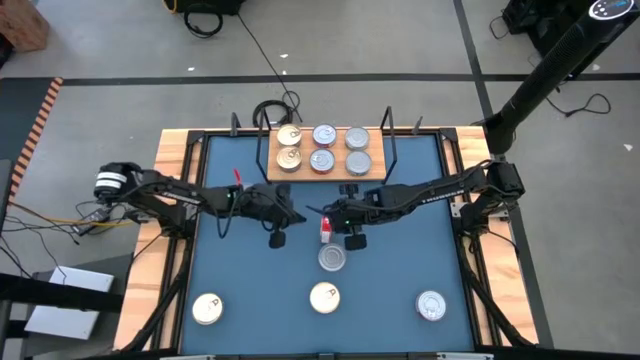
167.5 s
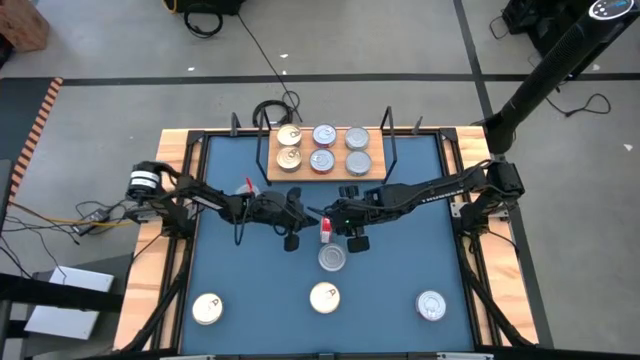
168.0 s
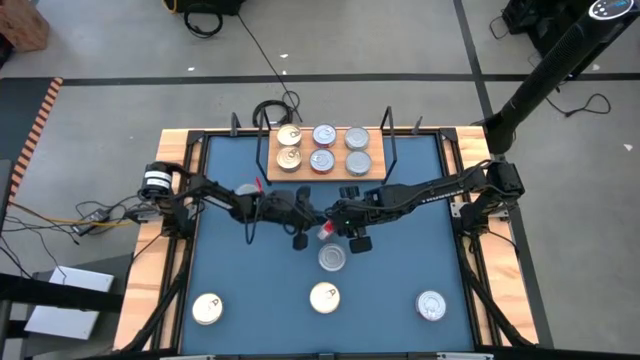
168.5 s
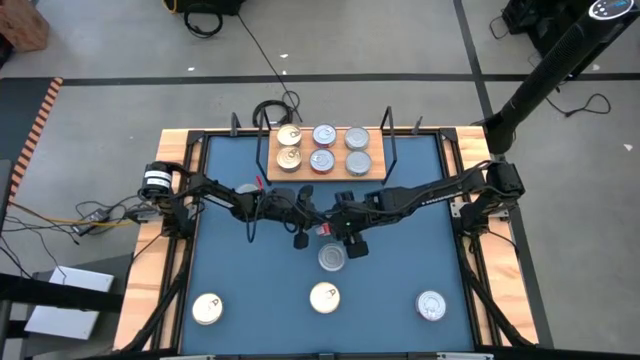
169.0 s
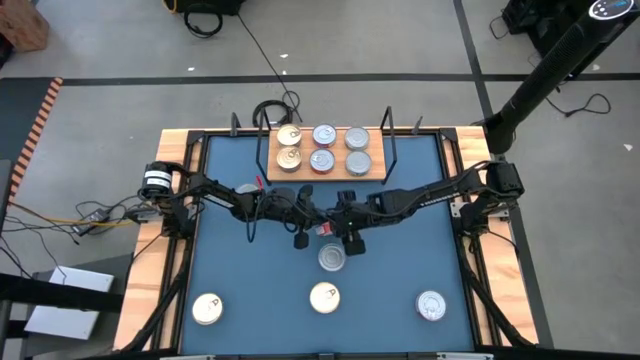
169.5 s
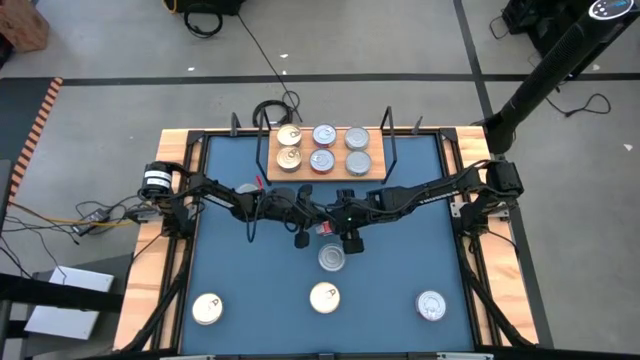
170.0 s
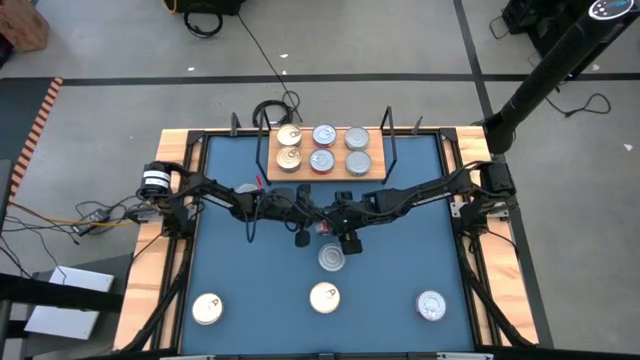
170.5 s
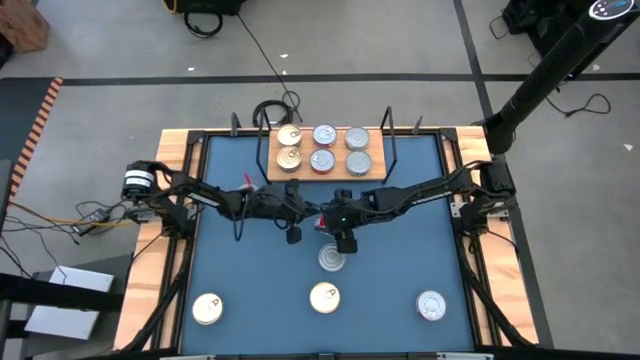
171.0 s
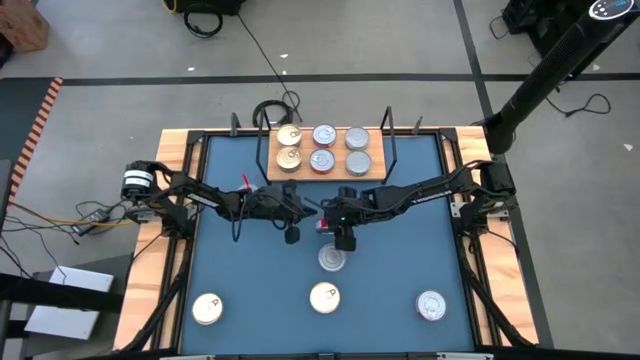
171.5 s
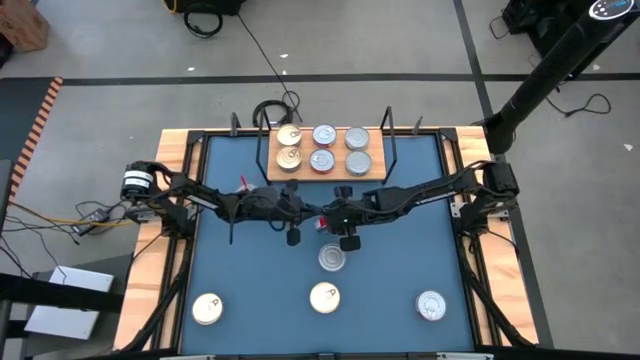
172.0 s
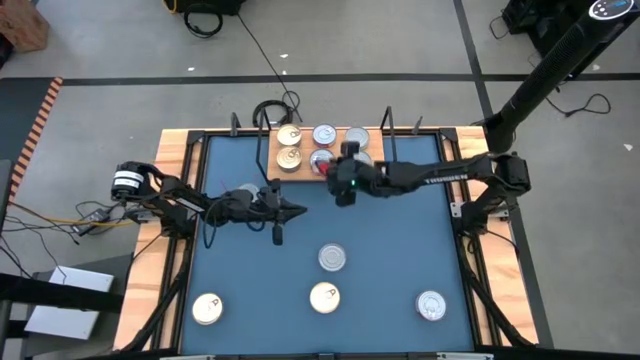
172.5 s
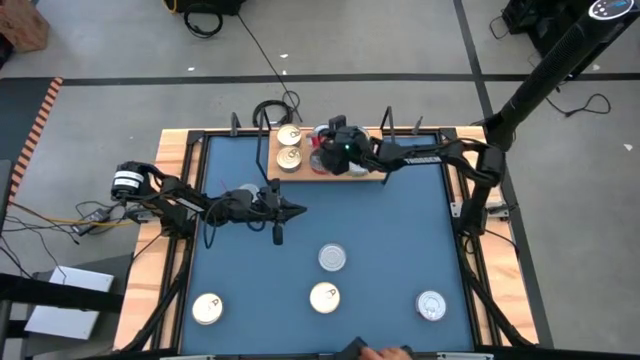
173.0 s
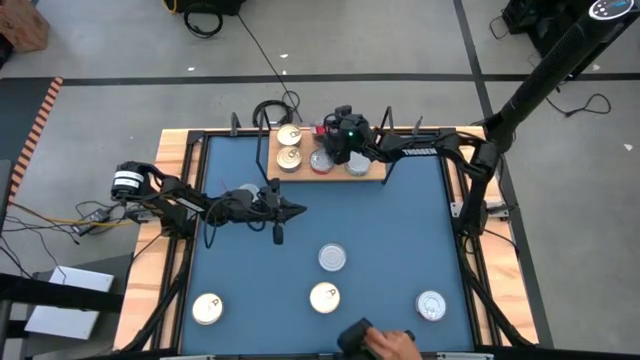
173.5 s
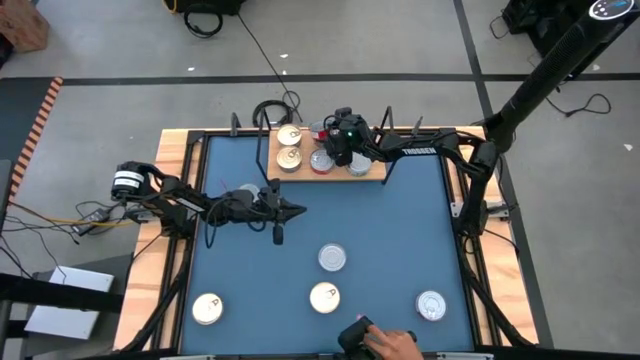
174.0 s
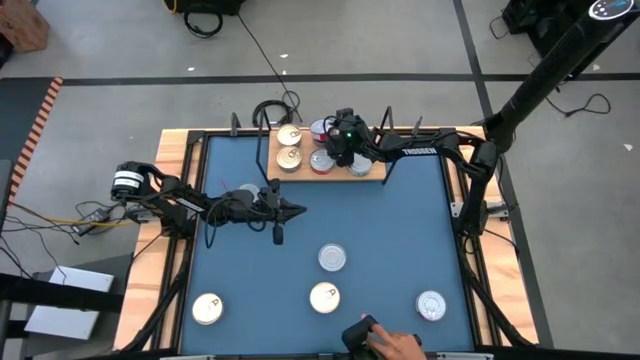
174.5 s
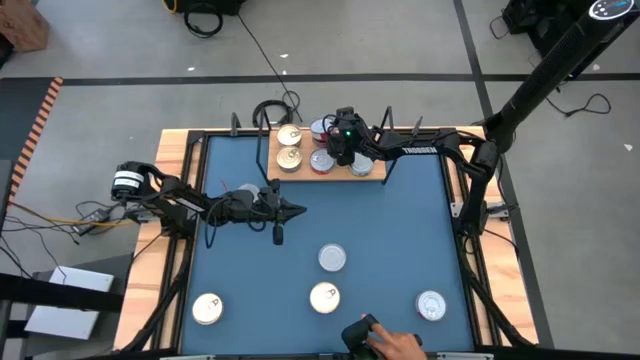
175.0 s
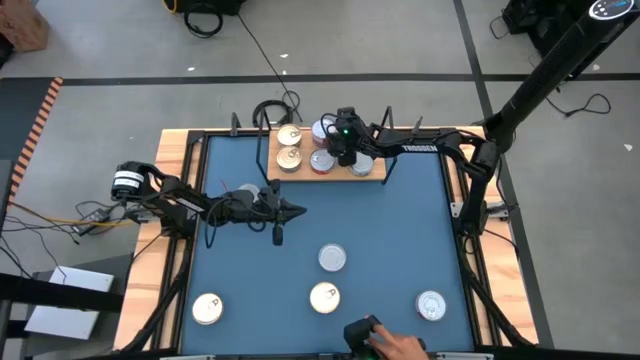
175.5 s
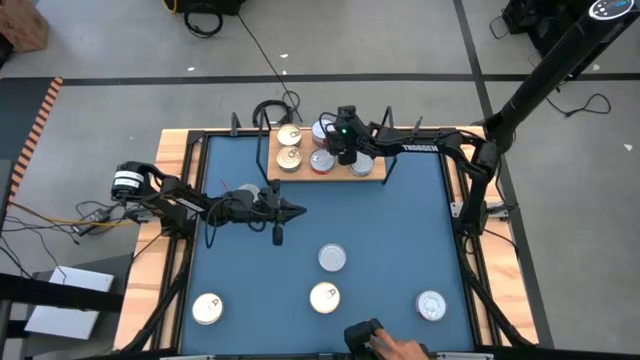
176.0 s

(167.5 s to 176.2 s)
Task: Stack canned seafood by type on shelf
Stack the top red tuna can on top red tuna can on the shelf

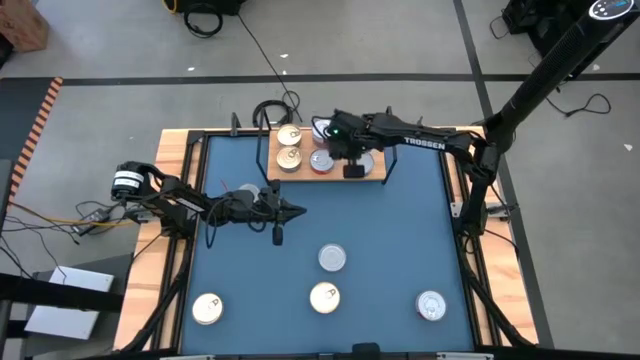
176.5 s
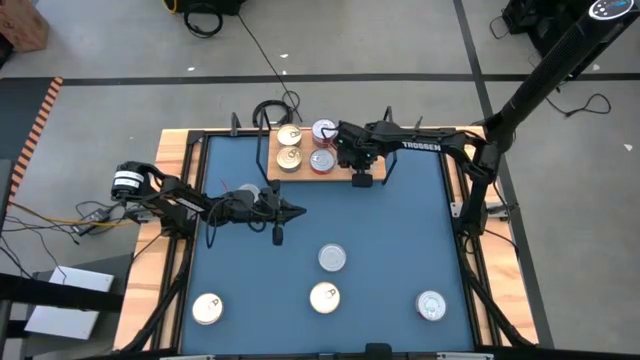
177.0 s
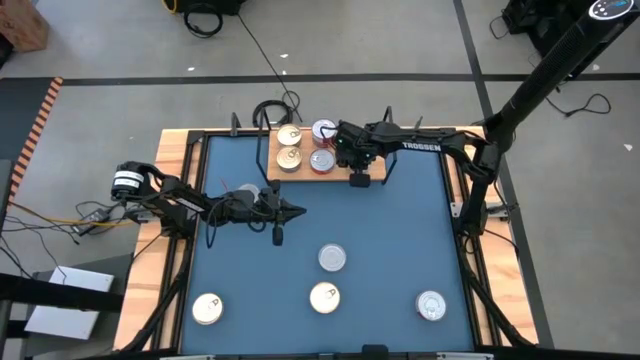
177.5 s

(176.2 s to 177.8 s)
Adjust the bottom white tuna can on the shelf

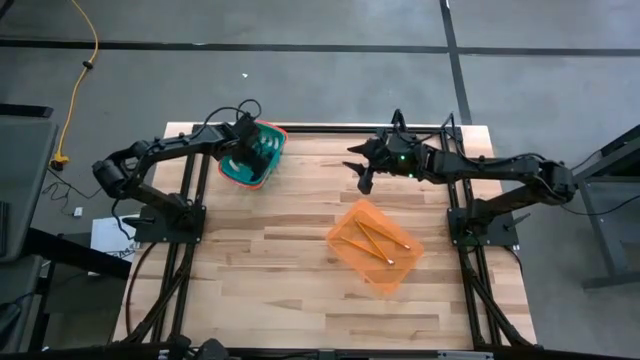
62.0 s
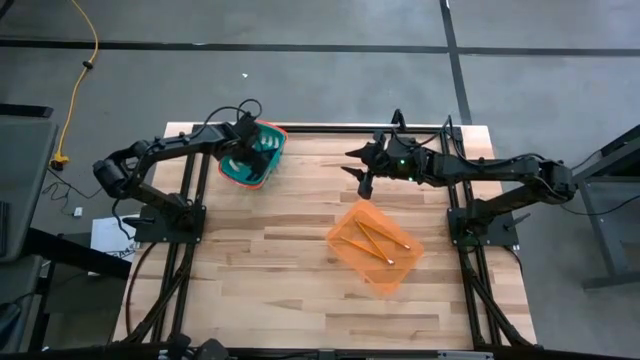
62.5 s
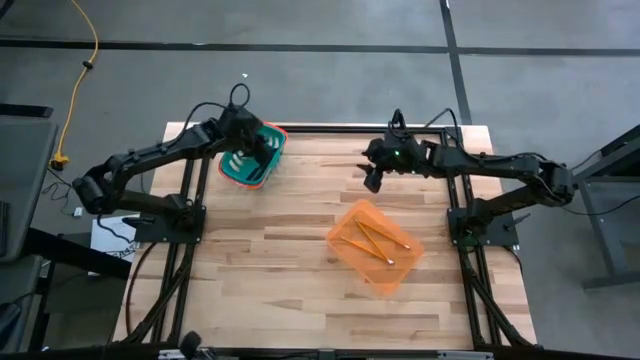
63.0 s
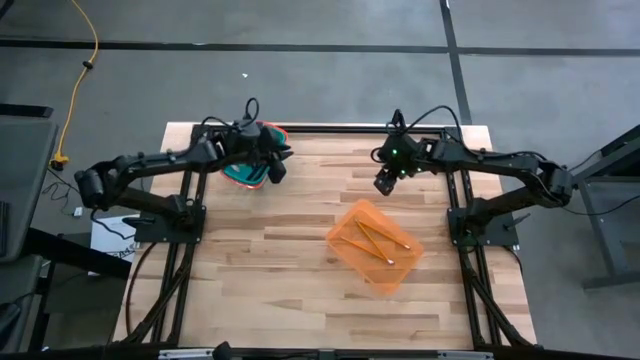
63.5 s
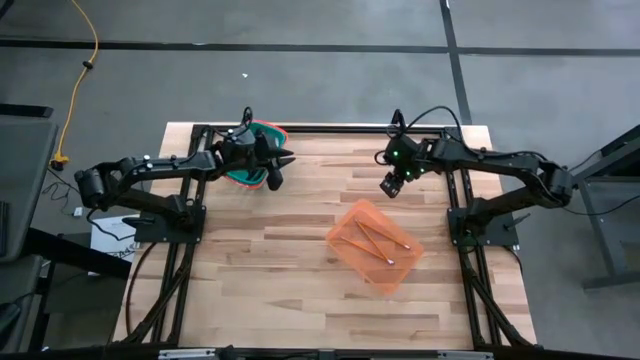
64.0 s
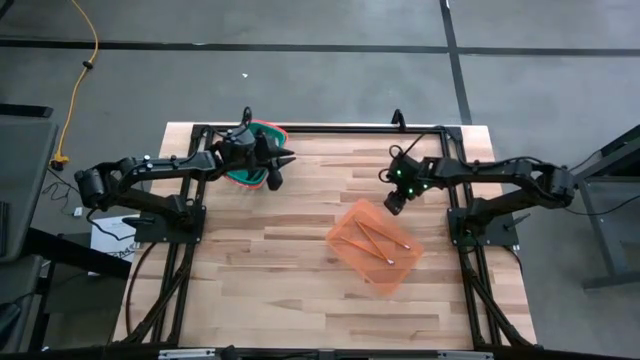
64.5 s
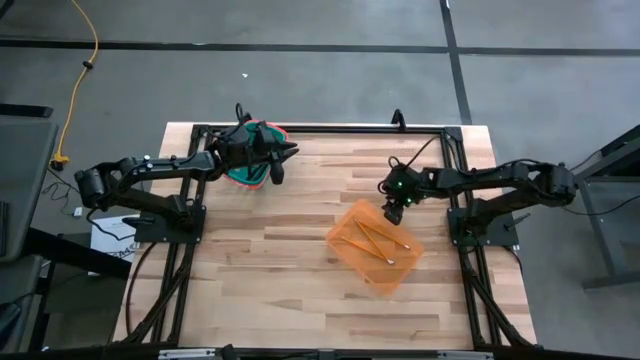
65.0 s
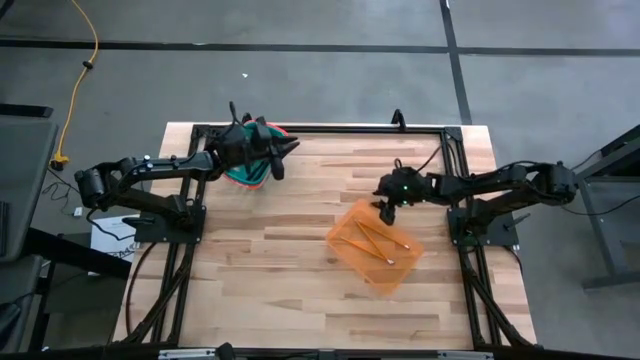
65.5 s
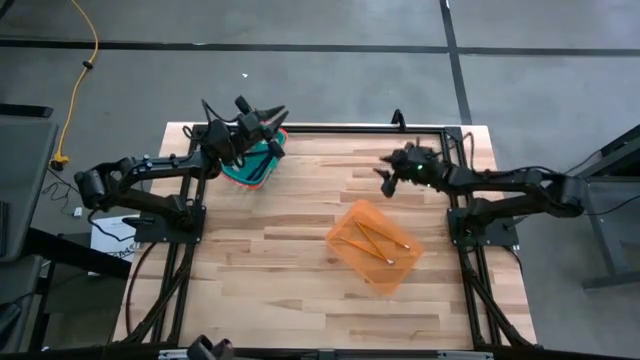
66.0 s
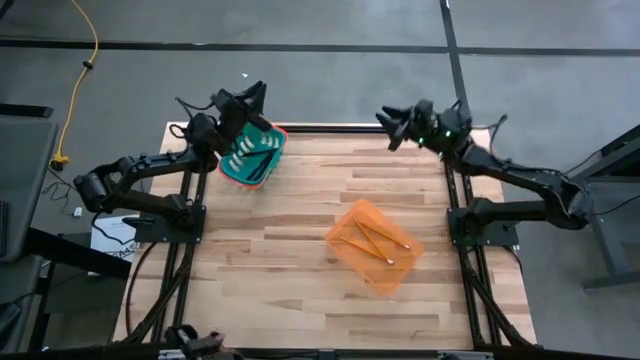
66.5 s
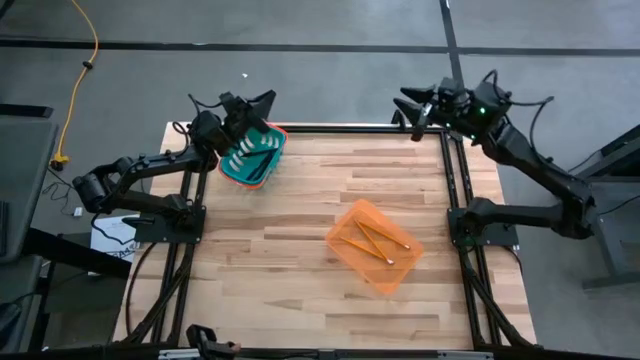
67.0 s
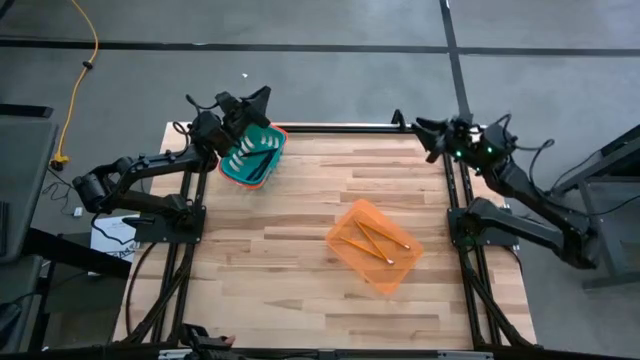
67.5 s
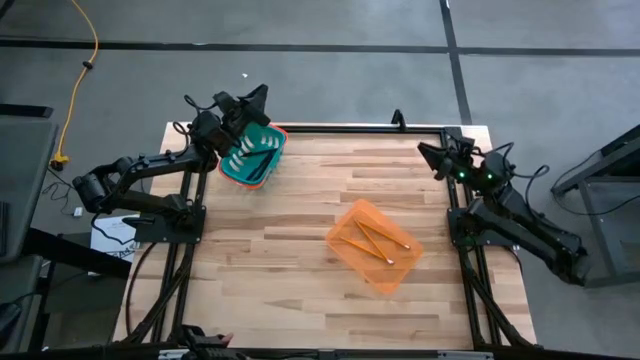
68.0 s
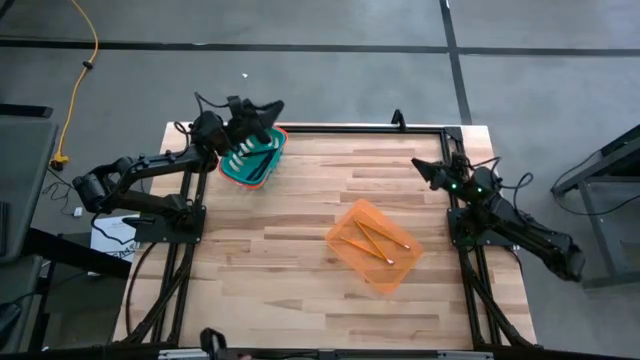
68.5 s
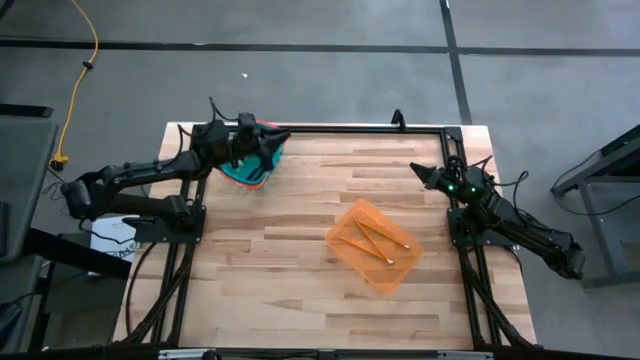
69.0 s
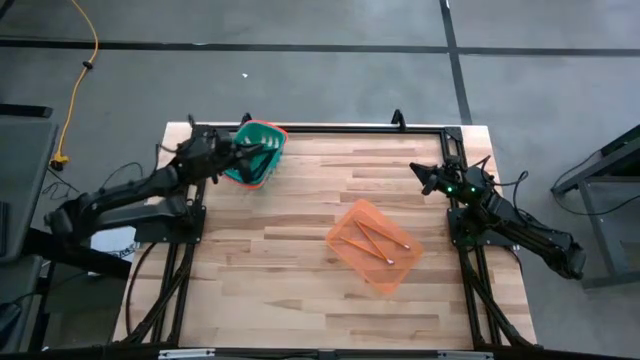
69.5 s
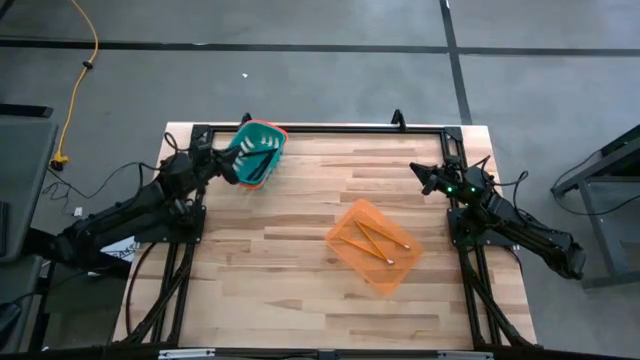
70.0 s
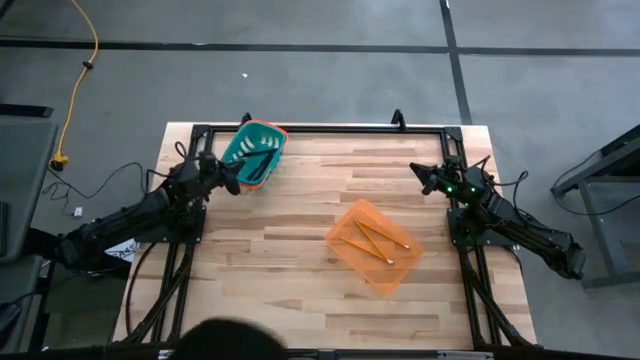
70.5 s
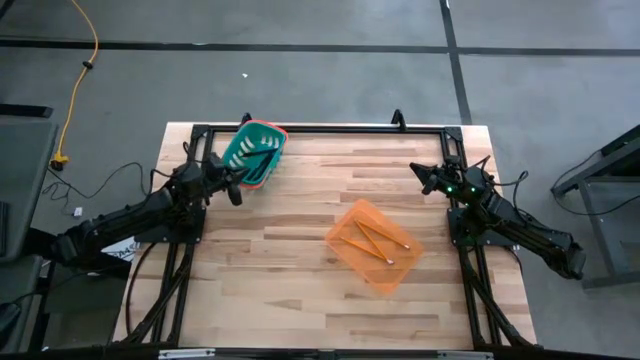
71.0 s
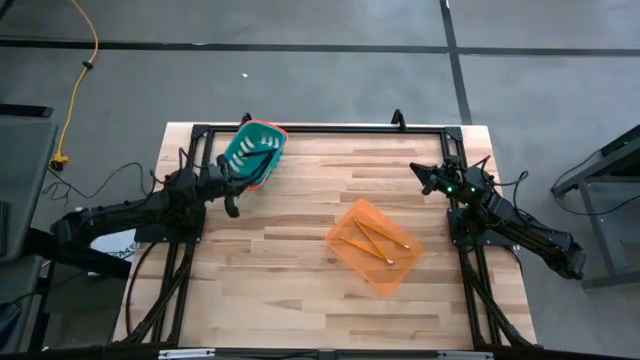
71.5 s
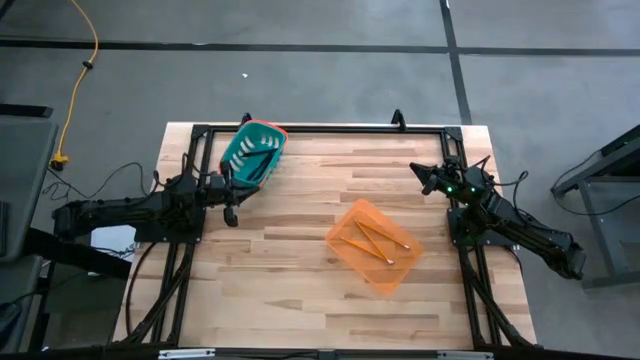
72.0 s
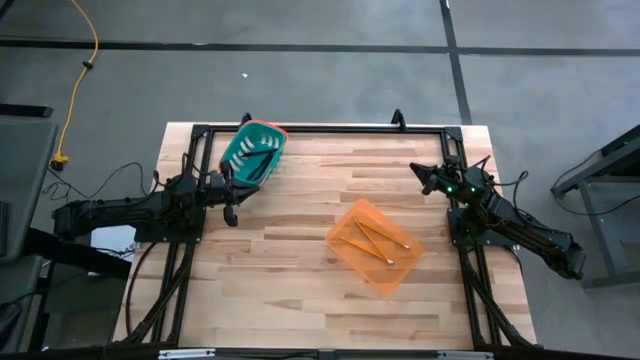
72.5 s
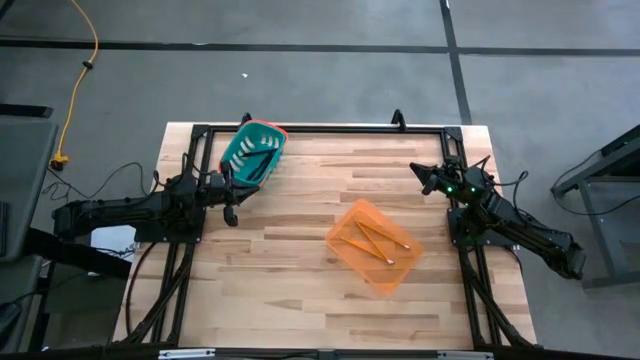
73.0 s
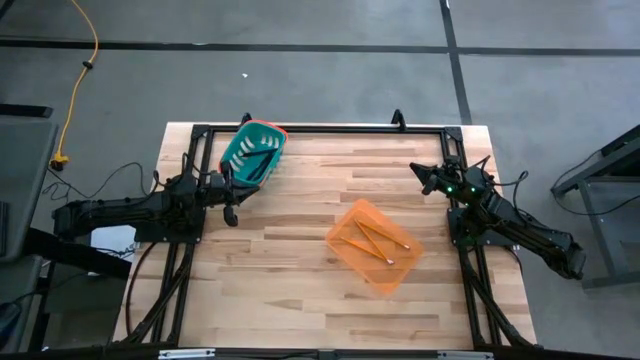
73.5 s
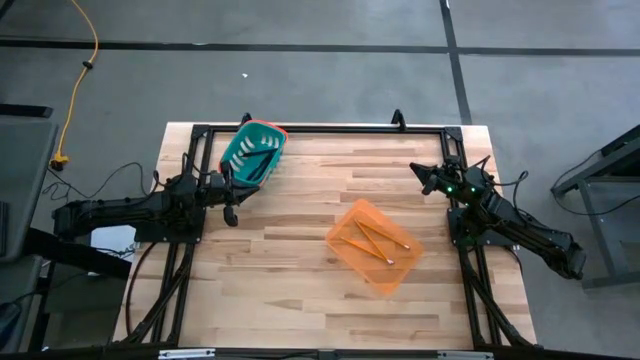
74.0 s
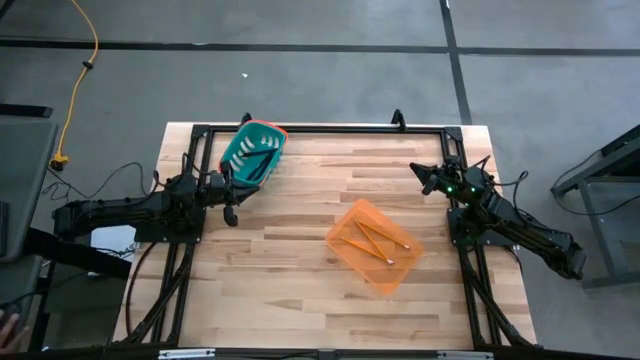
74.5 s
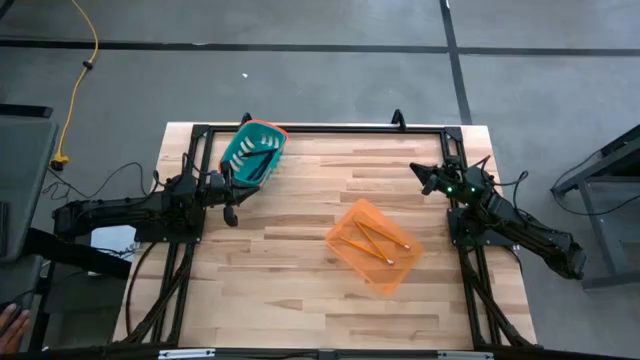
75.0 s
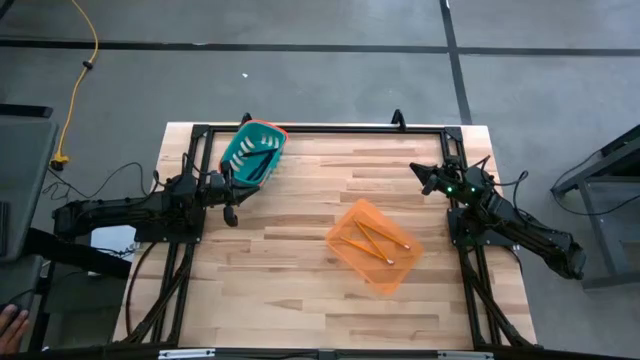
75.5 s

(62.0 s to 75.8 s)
Task: Sort pens & pencils
Return to Home Position
